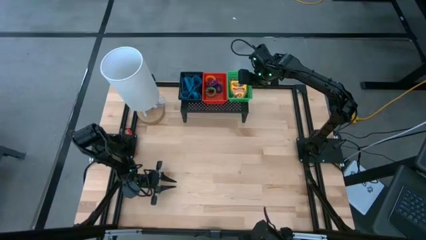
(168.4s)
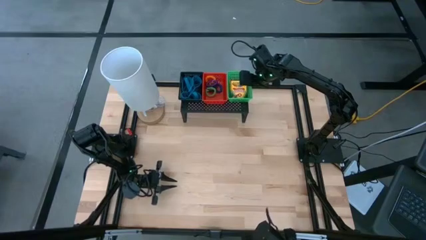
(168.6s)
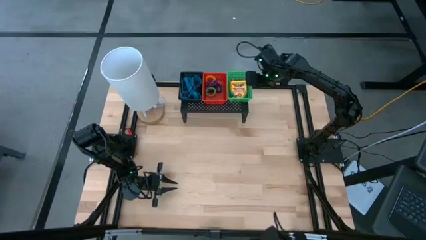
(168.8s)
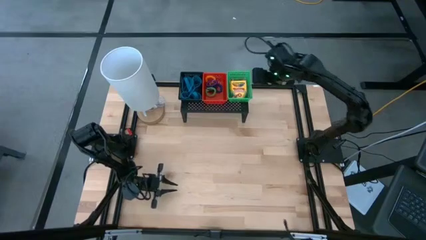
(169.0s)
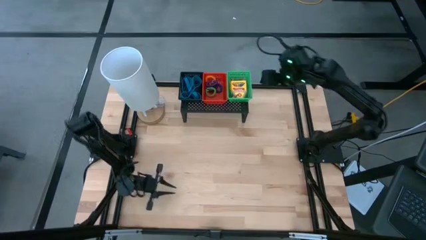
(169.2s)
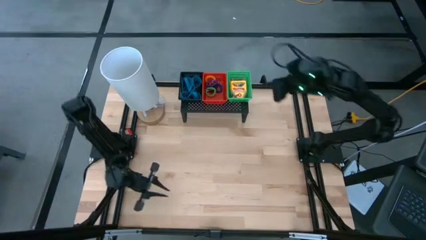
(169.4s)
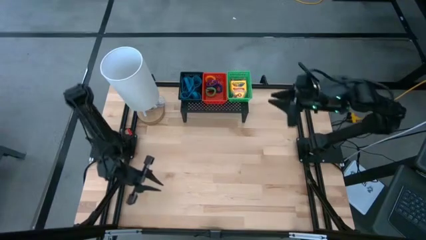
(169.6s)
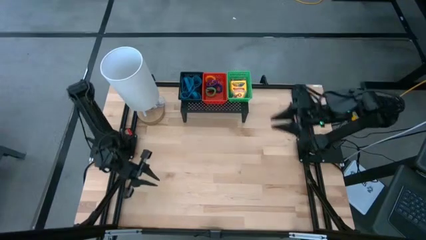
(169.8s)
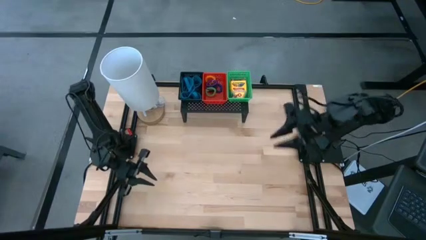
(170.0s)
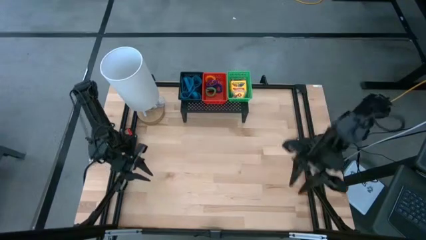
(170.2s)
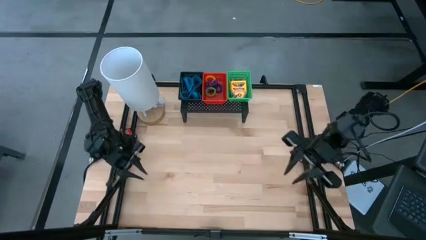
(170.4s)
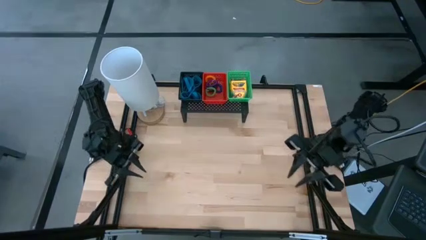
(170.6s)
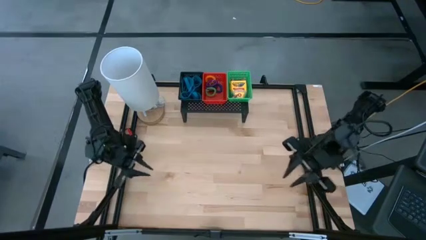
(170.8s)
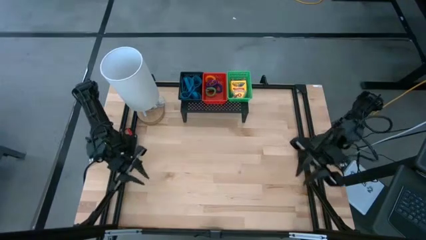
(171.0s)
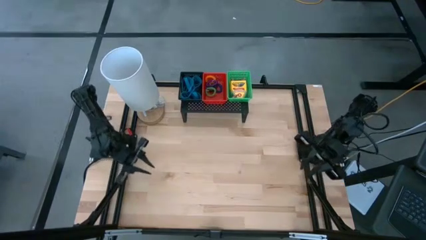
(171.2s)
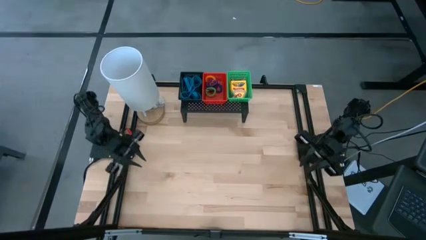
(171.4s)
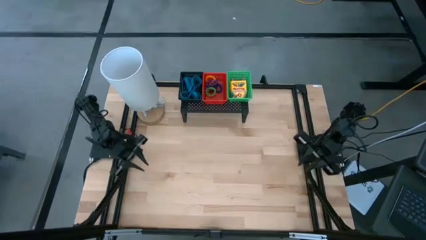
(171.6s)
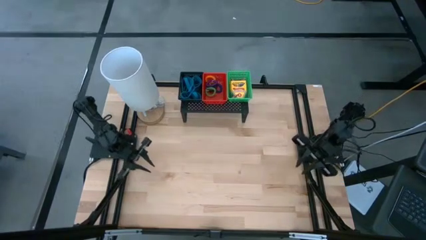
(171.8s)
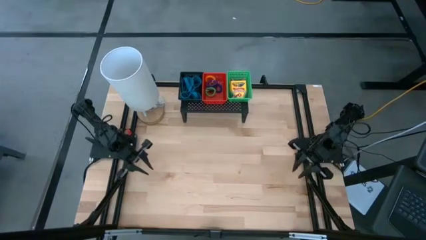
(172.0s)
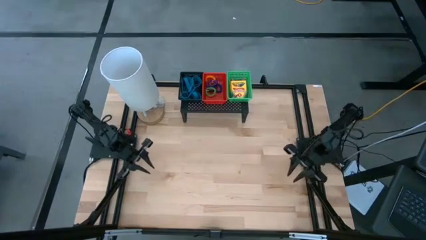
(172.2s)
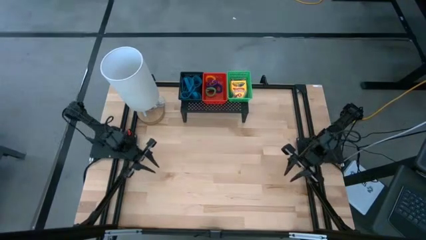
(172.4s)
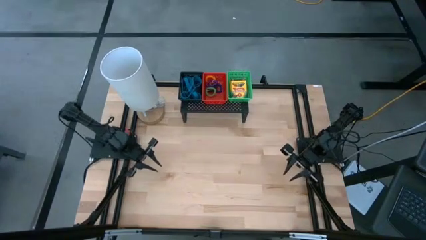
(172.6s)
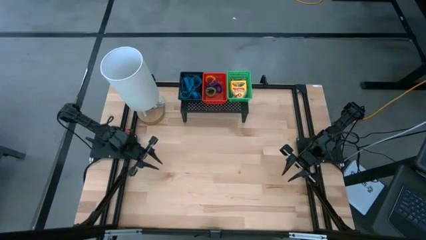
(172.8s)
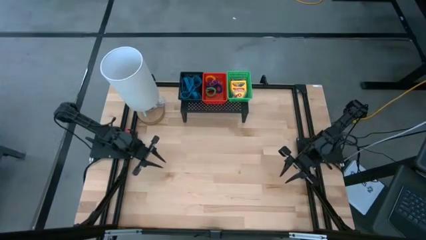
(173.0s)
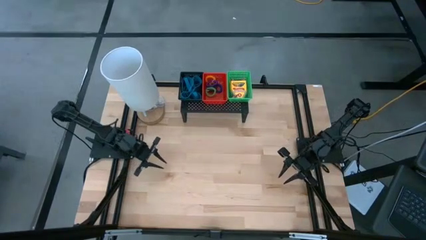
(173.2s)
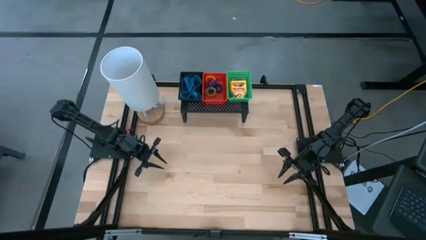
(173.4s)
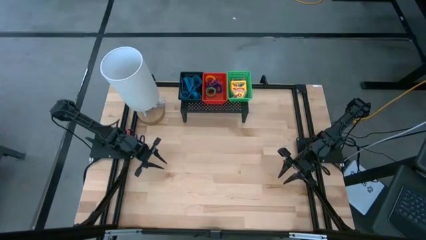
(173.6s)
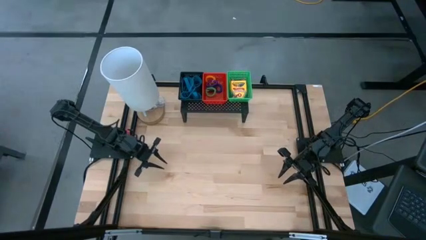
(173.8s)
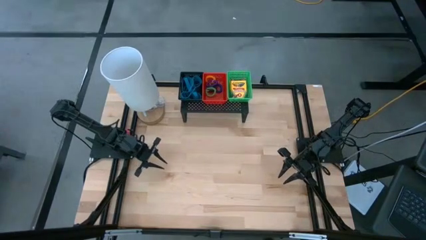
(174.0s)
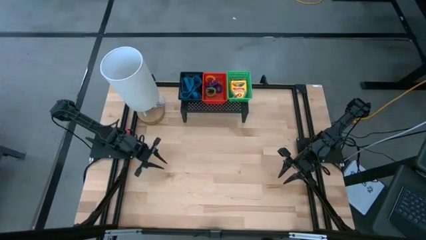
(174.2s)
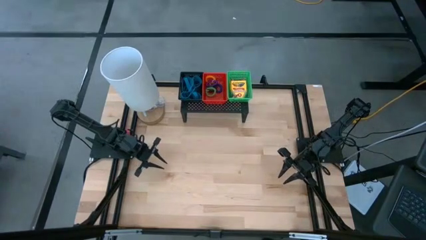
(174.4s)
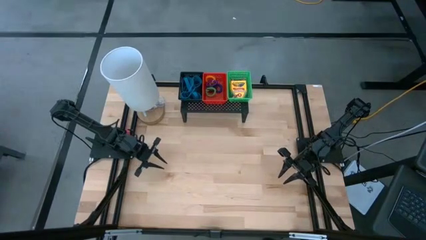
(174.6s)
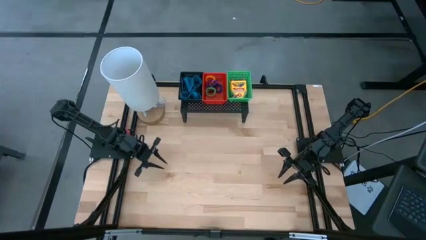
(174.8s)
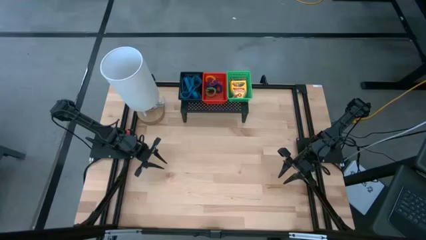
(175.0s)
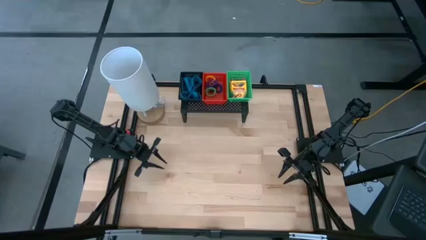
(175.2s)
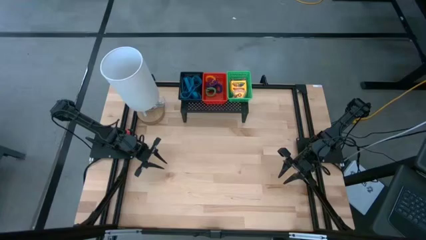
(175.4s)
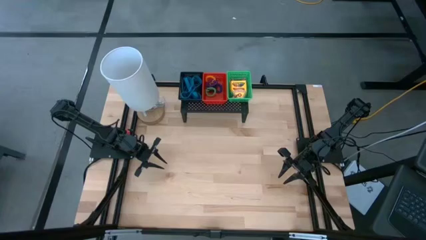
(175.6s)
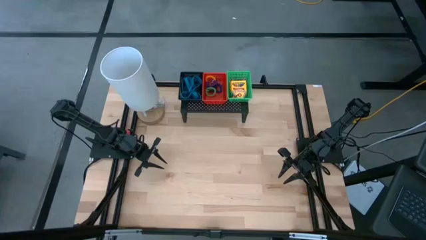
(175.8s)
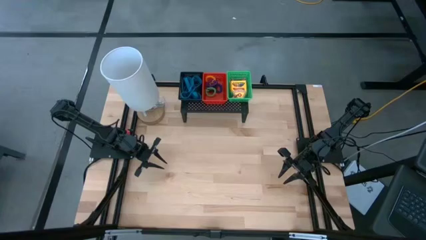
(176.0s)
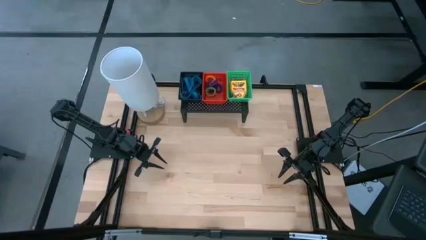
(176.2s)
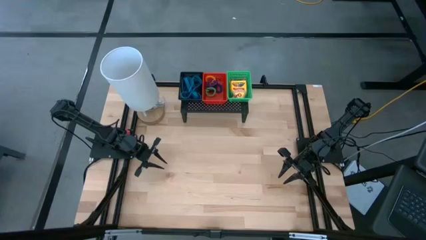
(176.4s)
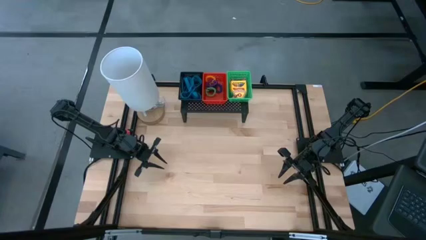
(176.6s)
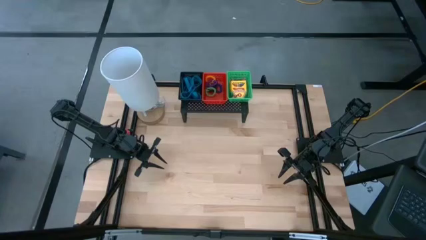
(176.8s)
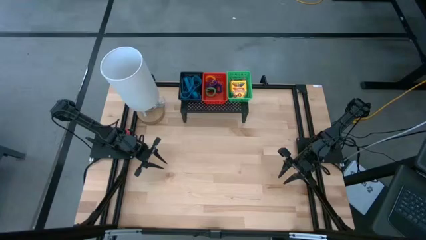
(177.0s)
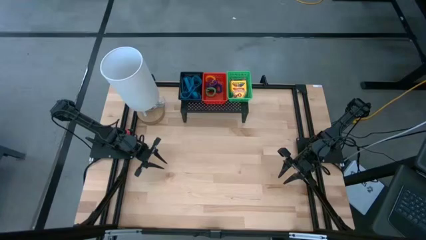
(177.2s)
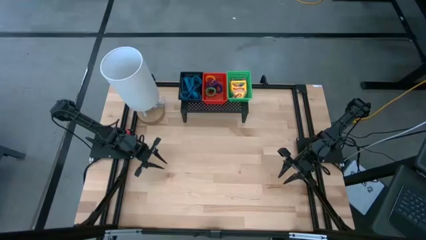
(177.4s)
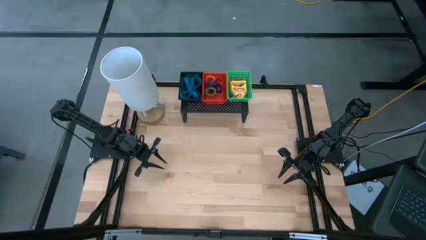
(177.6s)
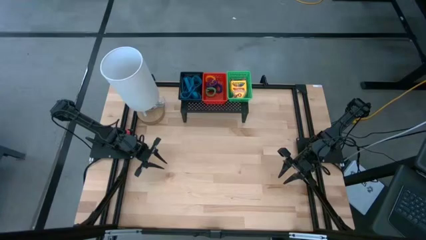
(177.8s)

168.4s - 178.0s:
Task: Pick & Place Office Desk Supplies
Return to Home Position

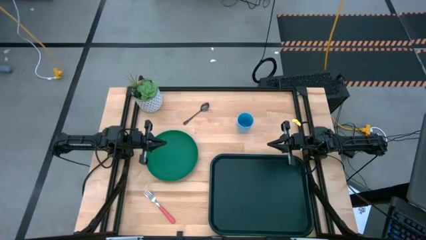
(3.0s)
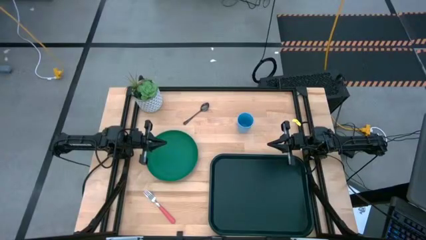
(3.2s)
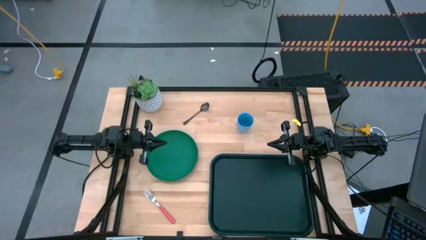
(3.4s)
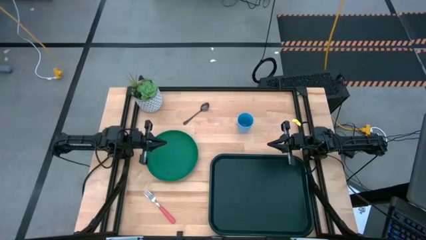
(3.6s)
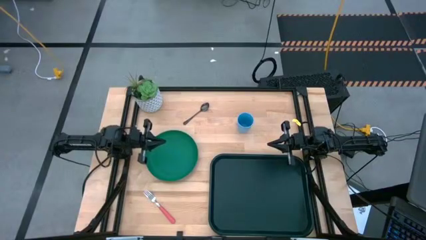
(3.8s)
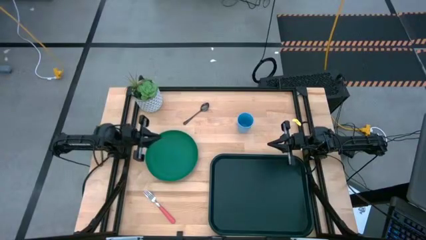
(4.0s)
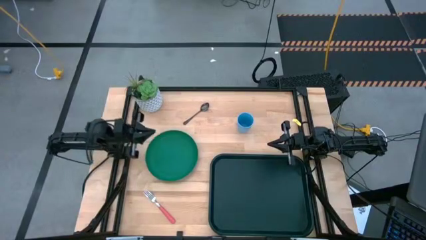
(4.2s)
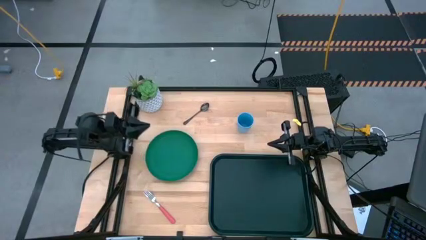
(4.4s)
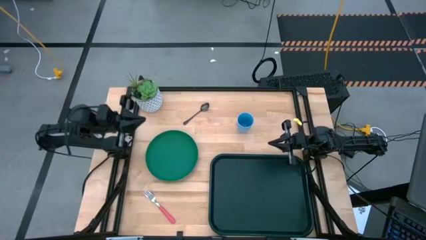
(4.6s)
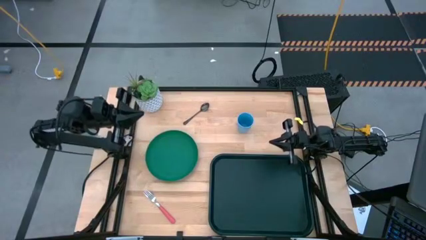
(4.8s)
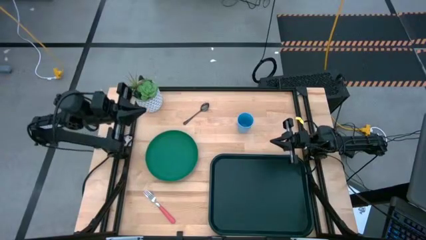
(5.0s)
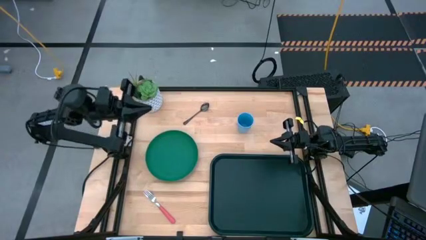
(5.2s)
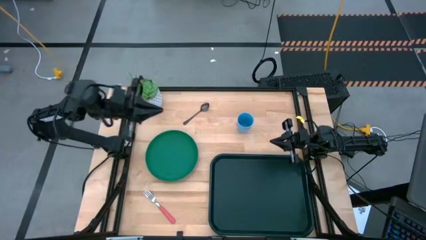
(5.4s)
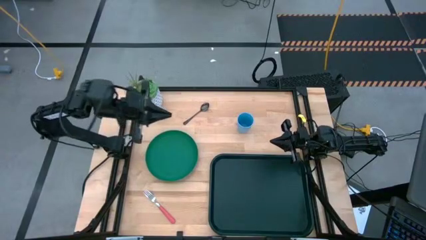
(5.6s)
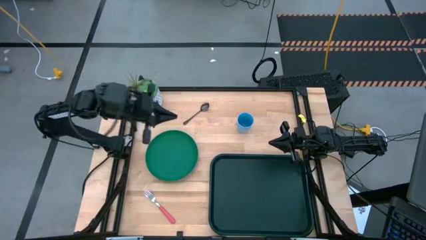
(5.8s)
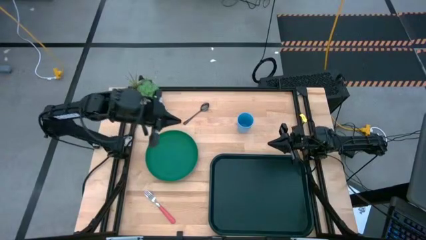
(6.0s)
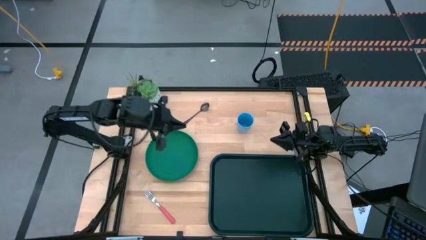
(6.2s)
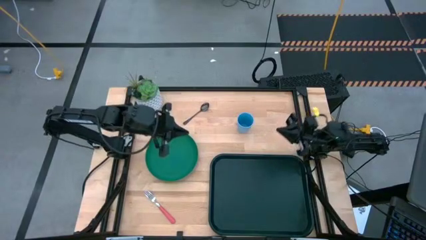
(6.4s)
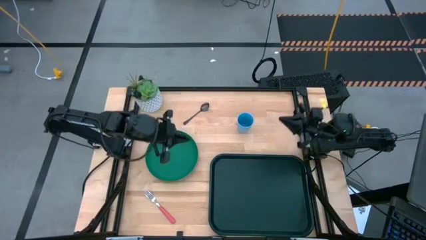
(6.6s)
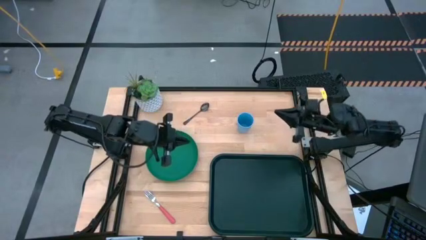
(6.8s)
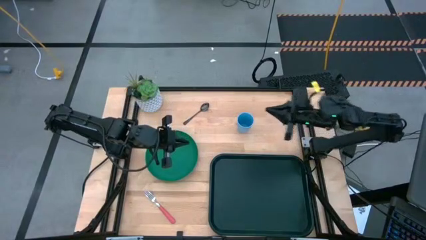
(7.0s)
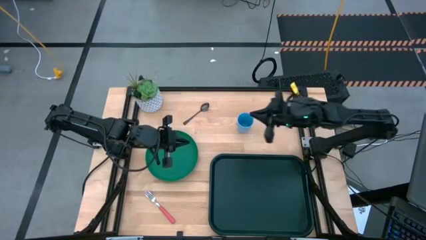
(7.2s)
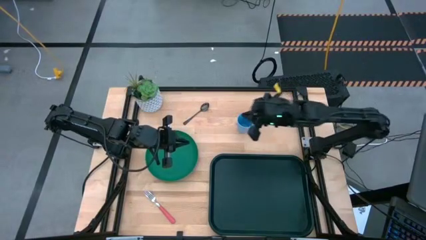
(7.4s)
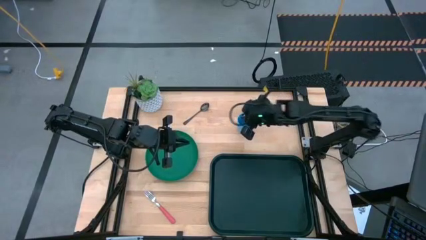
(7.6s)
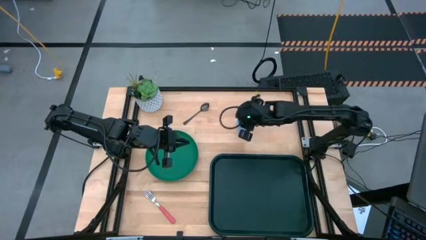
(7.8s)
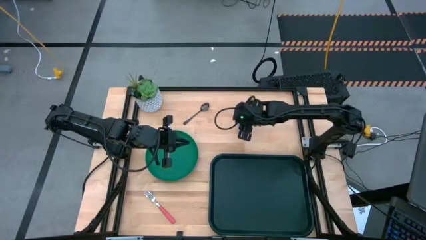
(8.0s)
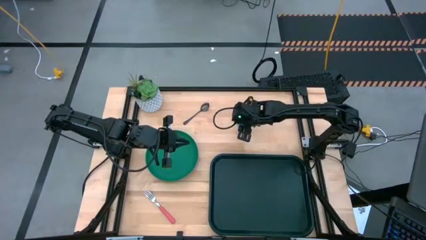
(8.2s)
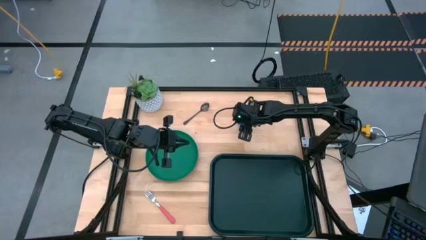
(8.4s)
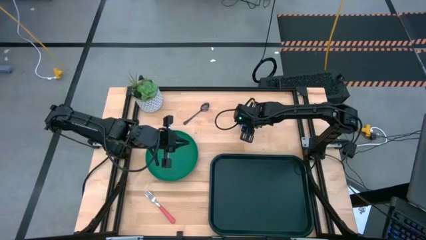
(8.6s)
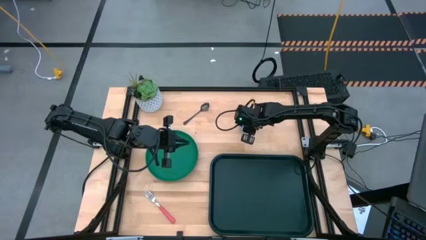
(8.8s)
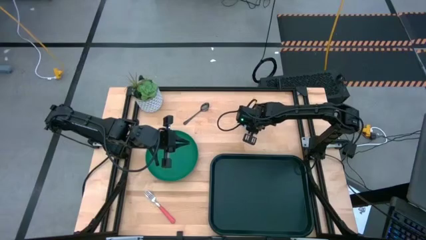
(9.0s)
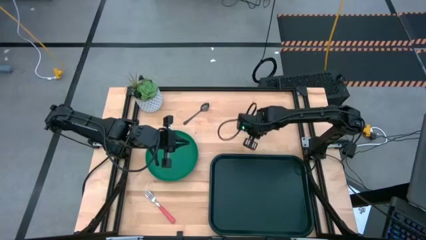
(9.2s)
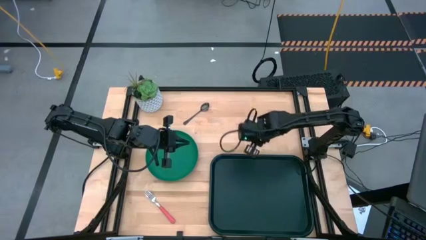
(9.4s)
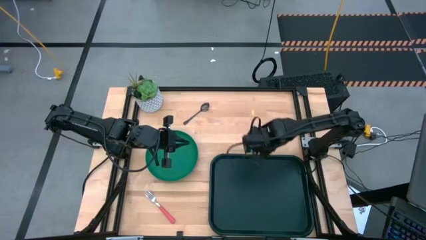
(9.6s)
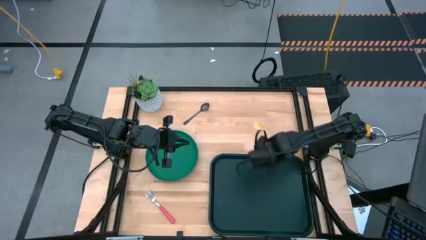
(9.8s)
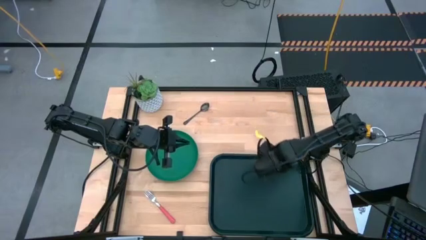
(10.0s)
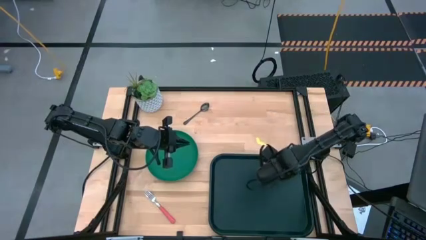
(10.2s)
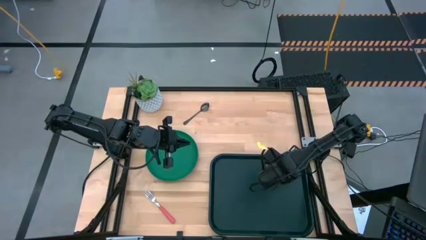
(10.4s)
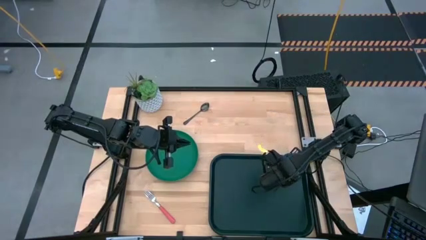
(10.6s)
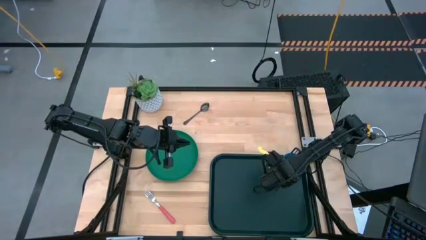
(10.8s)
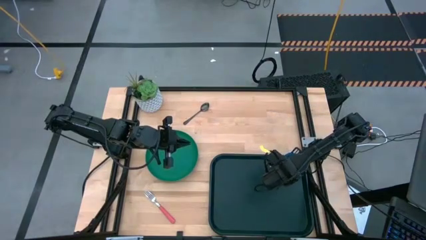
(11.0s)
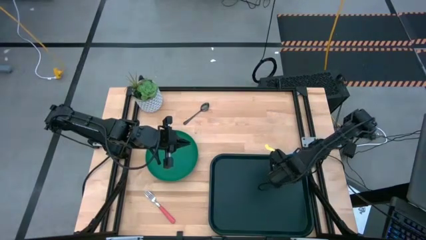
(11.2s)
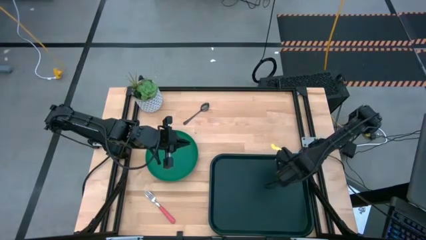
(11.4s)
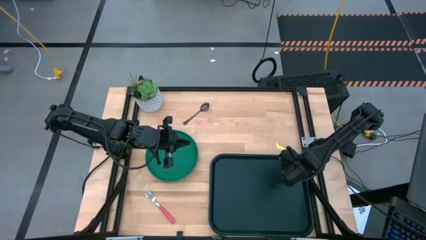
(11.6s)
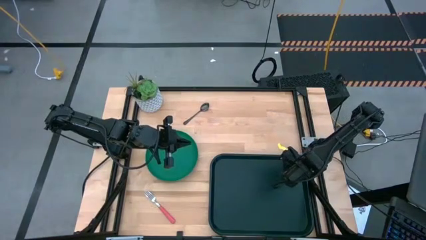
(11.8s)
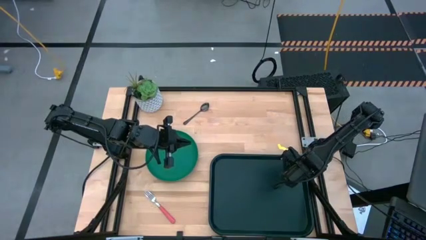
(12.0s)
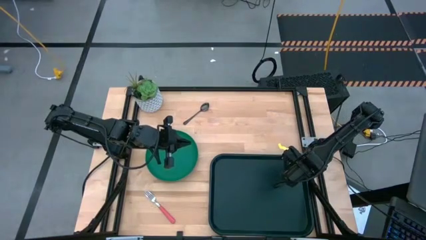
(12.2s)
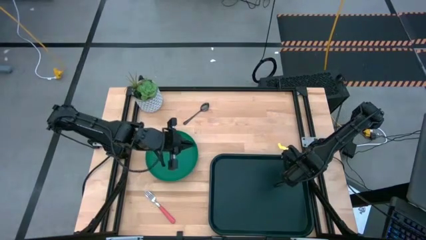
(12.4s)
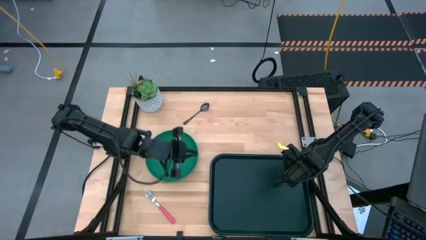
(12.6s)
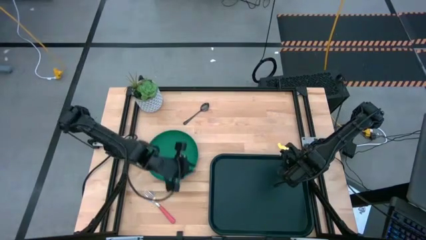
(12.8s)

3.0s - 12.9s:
Task: Pick and place plate/cup/fork/spoon on tray
Put the blue cup on the black serving tray
